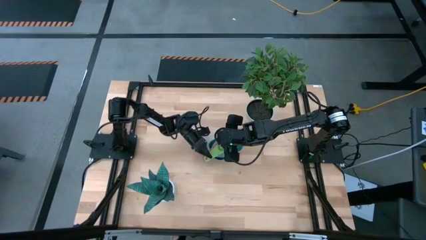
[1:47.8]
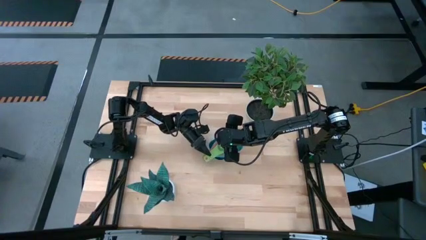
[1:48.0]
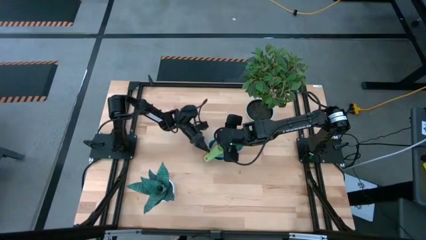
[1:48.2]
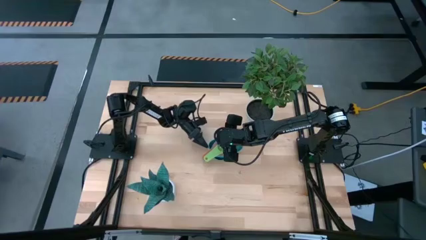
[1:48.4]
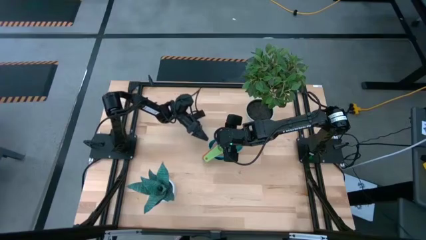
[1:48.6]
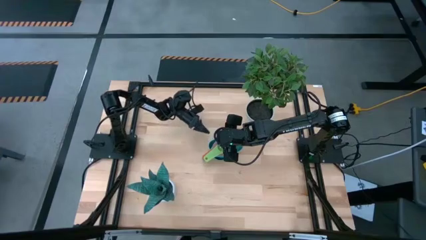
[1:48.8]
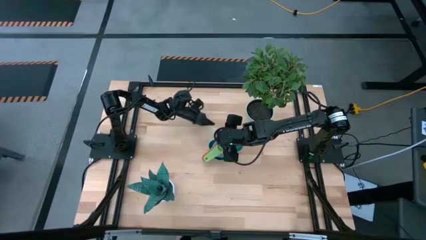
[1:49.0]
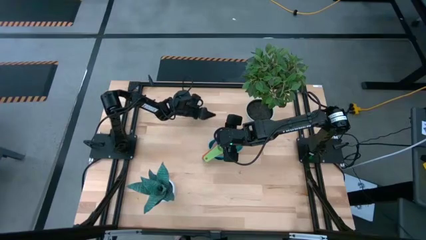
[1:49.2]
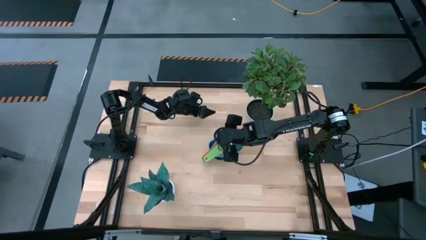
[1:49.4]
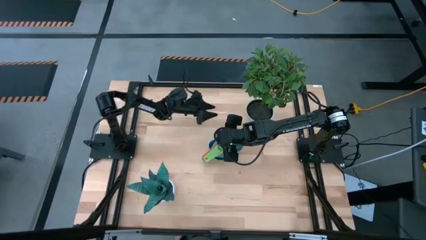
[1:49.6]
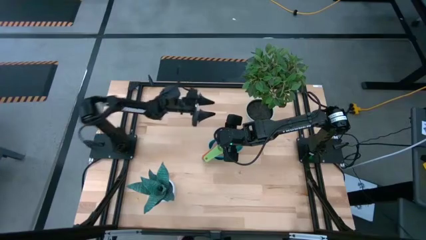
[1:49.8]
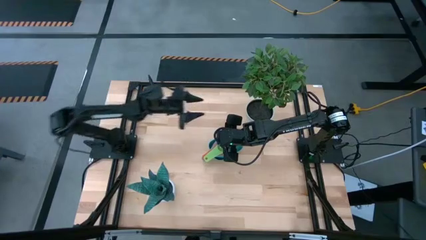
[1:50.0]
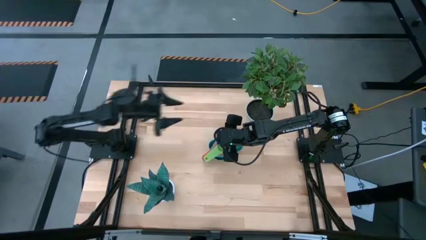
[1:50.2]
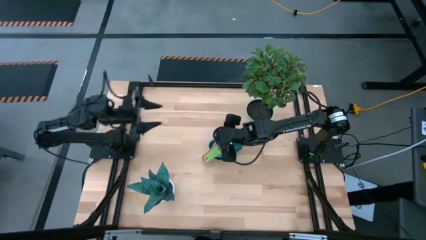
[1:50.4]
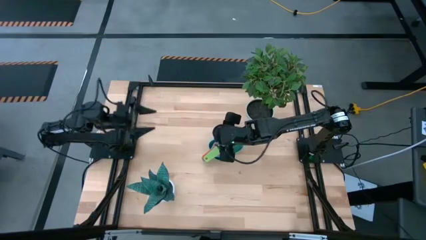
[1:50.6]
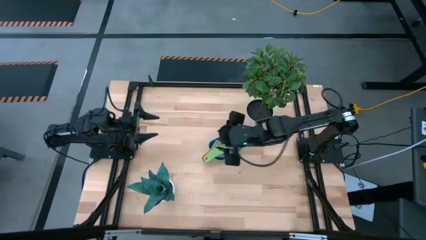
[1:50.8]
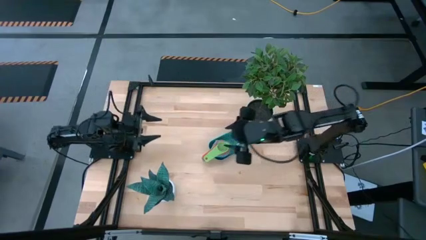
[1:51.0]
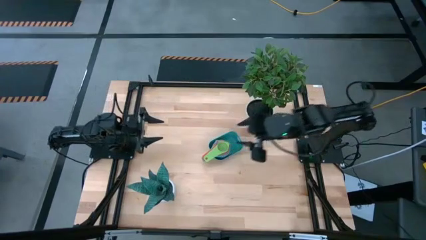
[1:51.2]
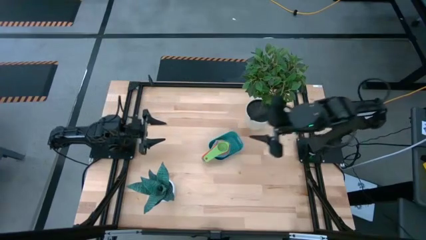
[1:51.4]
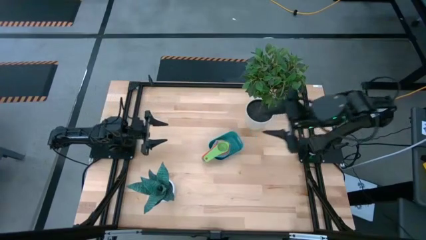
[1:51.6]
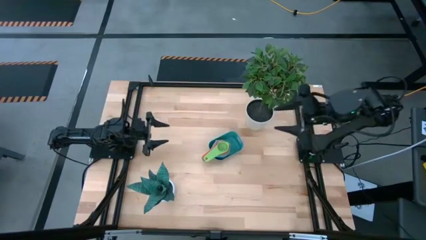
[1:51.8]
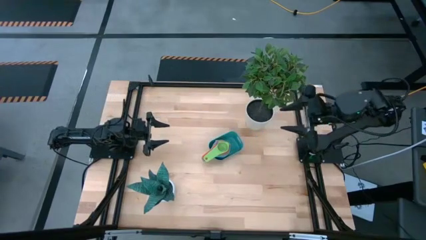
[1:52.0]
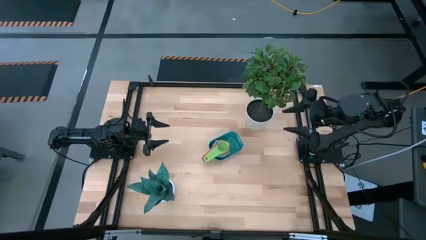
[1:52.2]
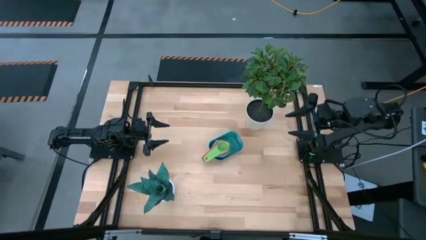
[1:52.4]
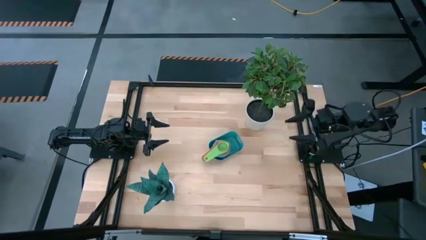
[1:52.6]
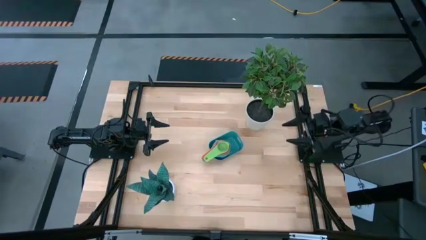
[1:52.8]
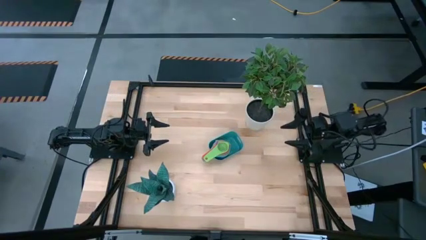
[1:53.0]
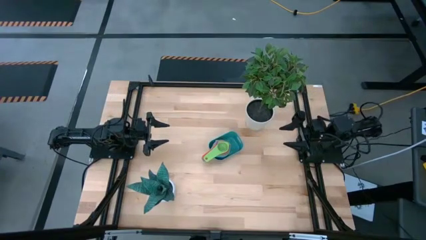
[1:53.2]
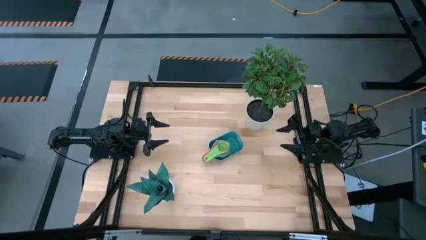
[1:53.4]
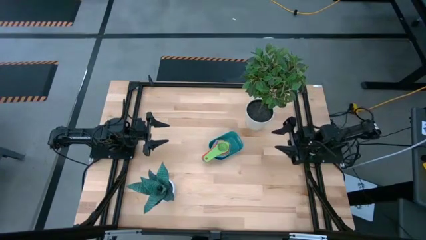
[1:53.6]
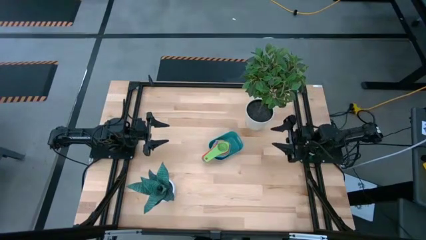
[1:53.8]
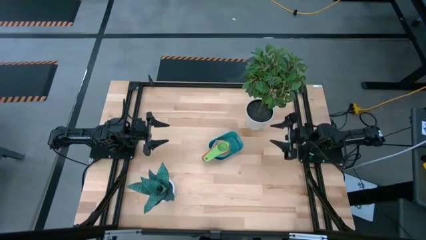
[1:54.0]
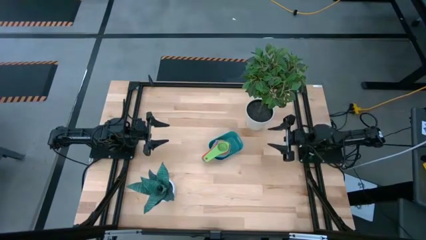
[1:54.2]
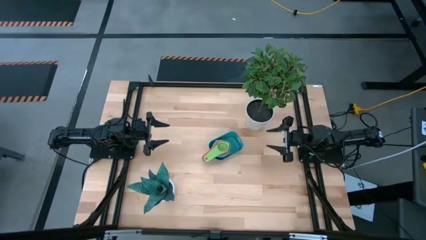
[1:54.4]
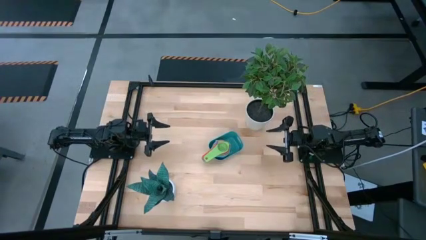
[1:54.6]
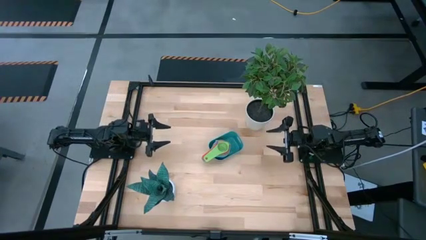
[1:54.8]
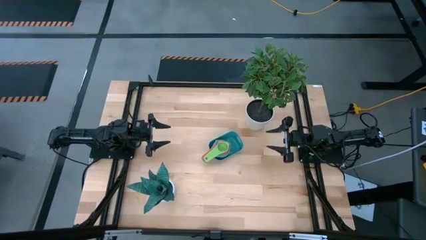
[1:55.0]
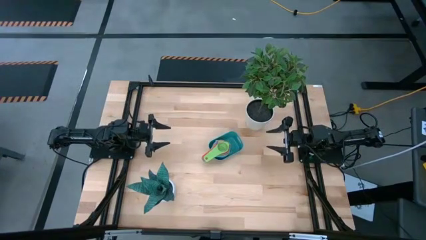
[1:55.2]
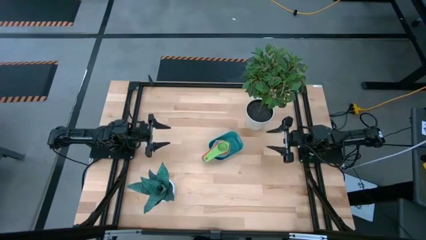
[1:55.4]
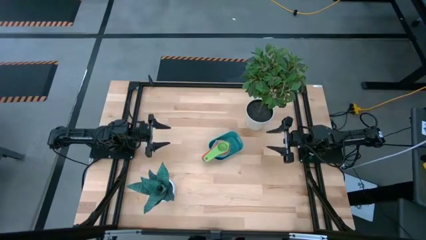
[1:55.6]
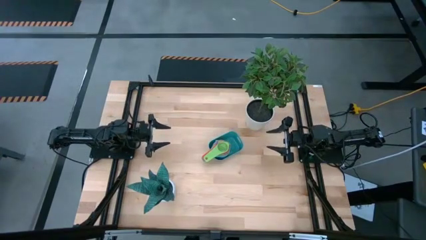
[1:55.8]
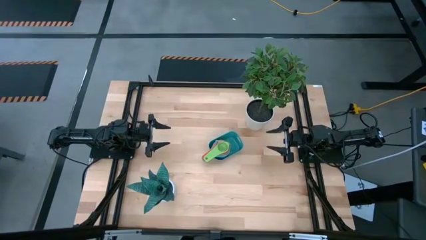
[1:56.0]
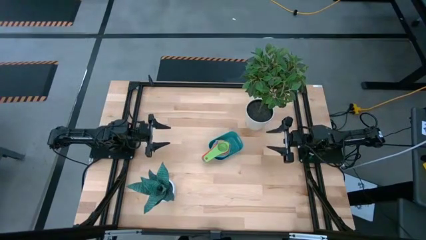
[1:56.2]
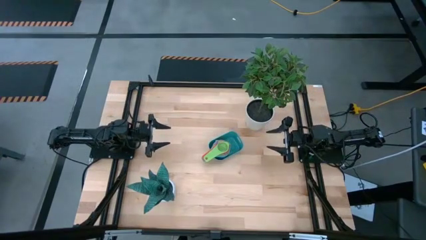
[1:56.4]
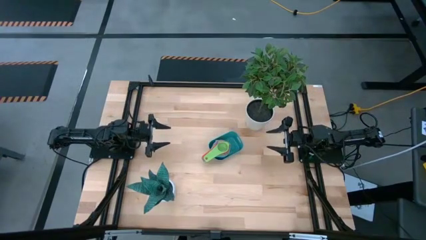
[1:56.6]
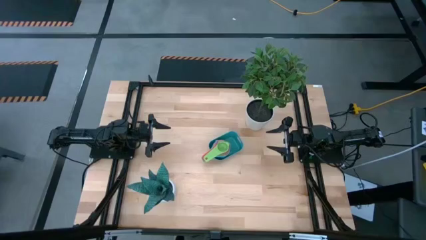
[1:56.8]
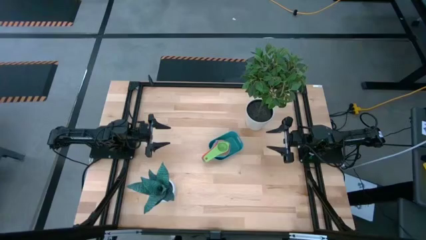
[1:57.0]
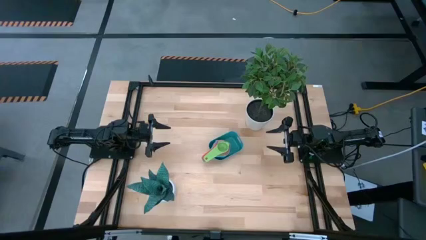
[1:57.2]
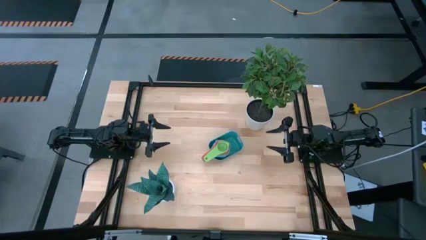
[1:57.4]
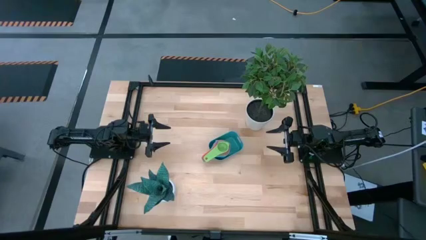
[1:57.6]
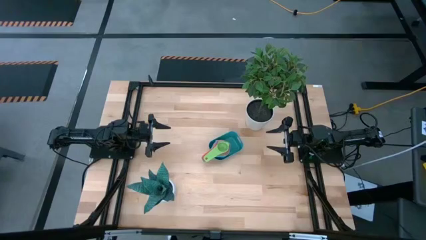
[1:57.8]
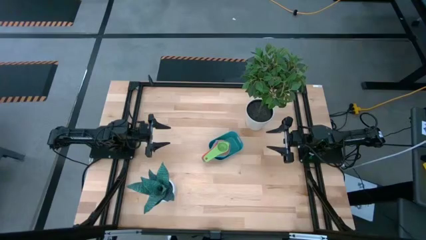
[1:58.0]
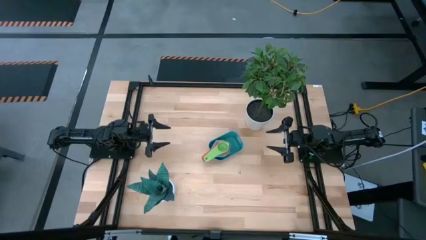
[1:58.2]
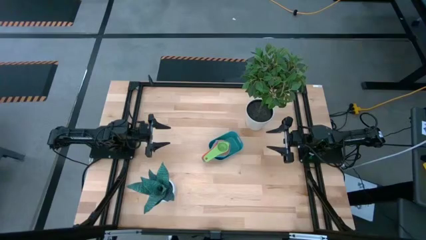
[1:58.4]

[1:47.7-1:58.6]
Task: Nest measuring cups in basket
Return to Home Position
